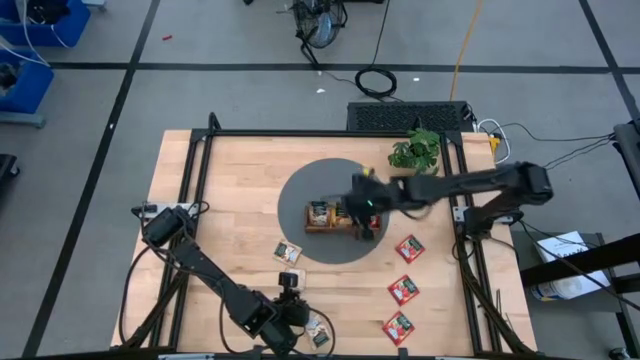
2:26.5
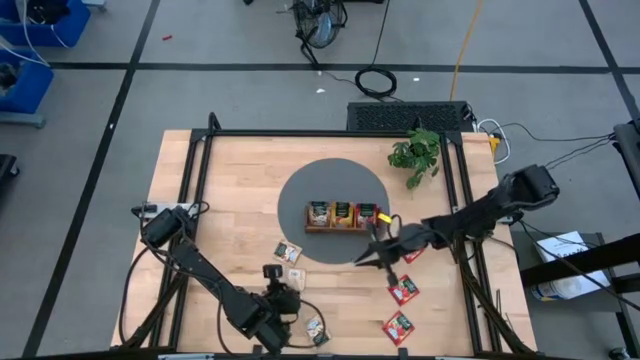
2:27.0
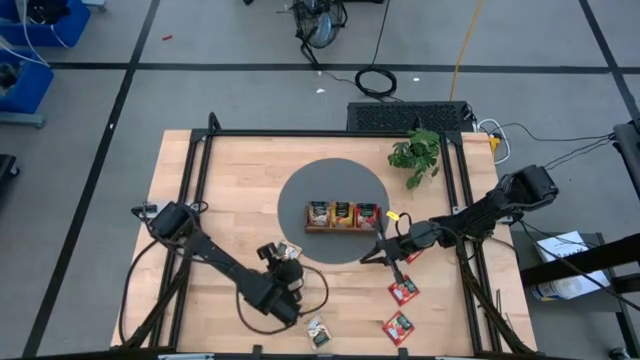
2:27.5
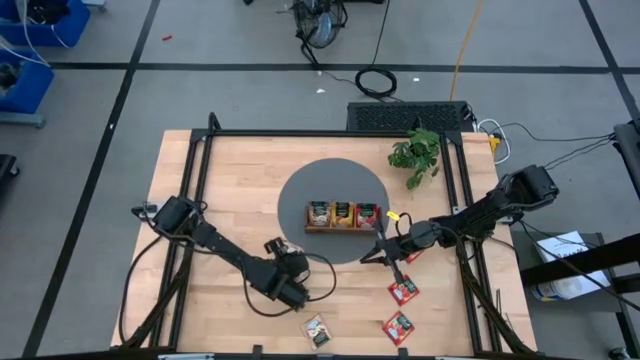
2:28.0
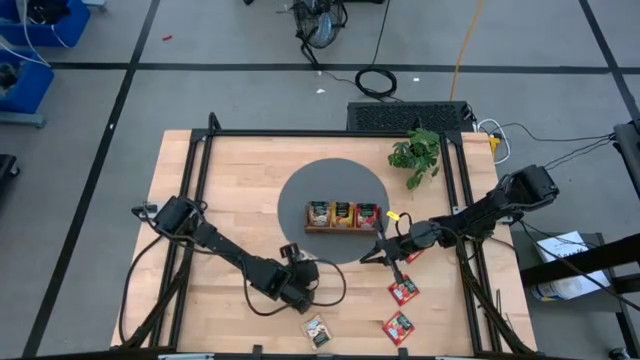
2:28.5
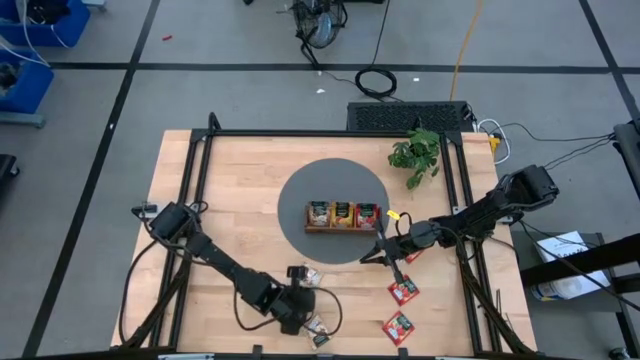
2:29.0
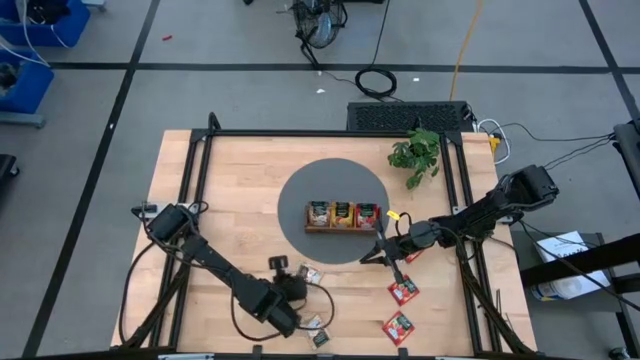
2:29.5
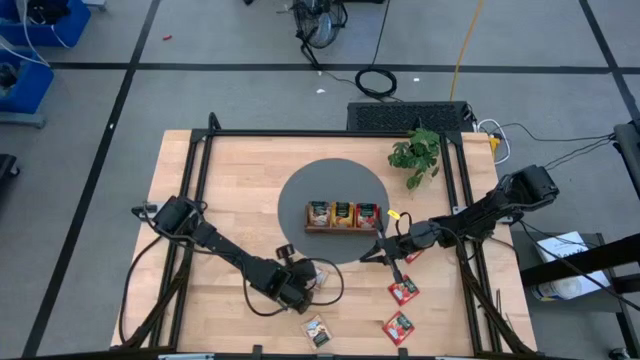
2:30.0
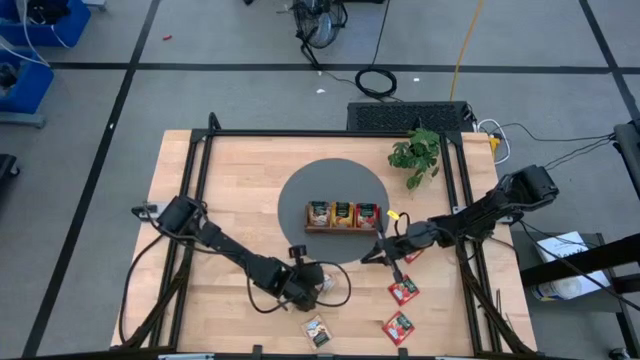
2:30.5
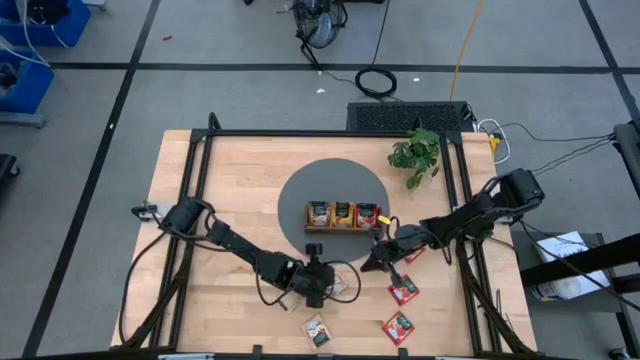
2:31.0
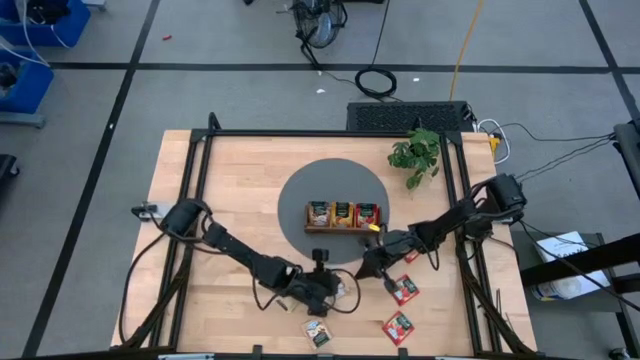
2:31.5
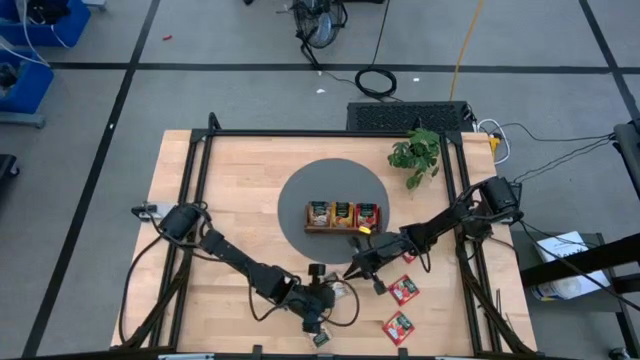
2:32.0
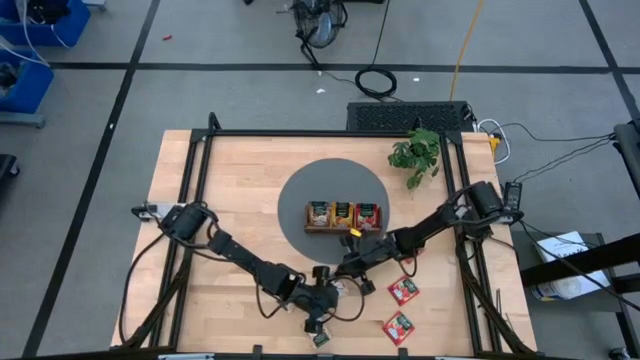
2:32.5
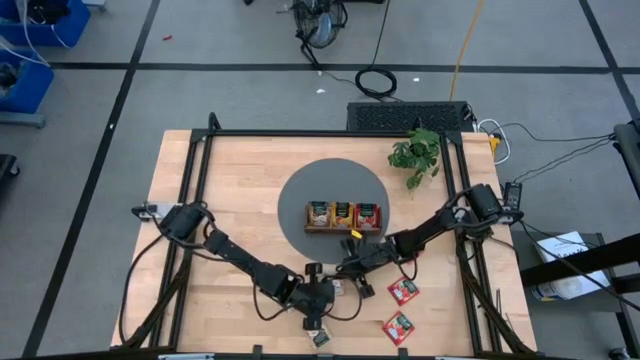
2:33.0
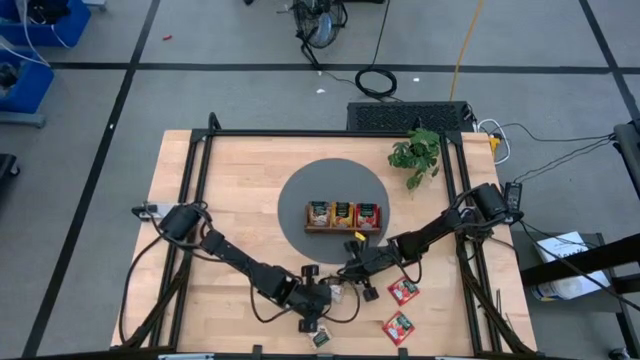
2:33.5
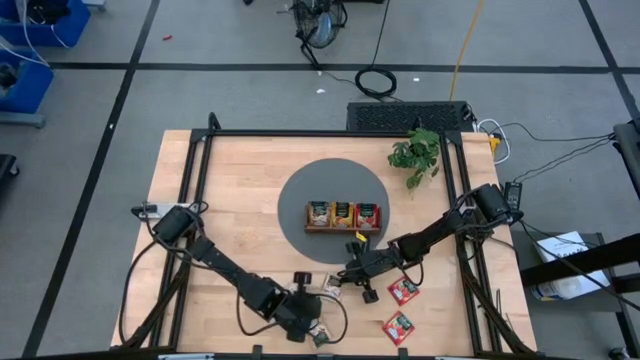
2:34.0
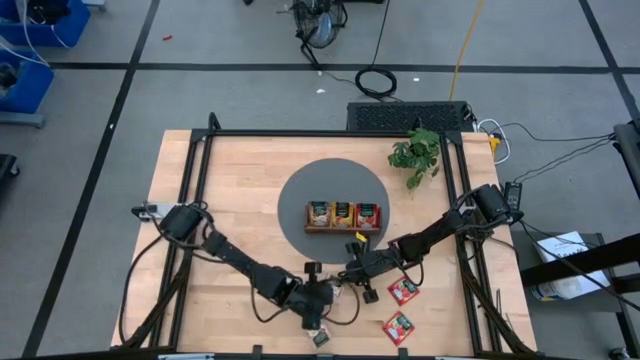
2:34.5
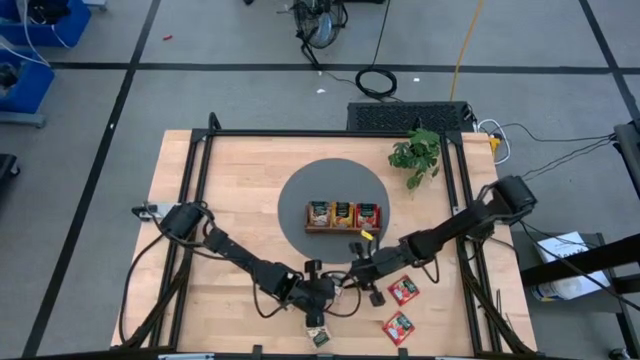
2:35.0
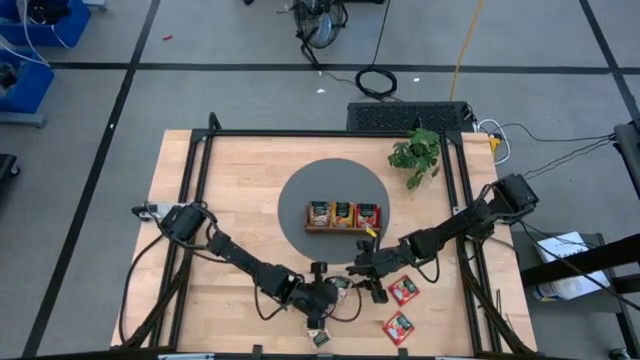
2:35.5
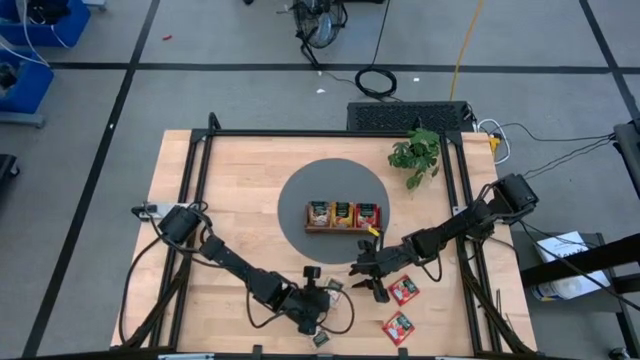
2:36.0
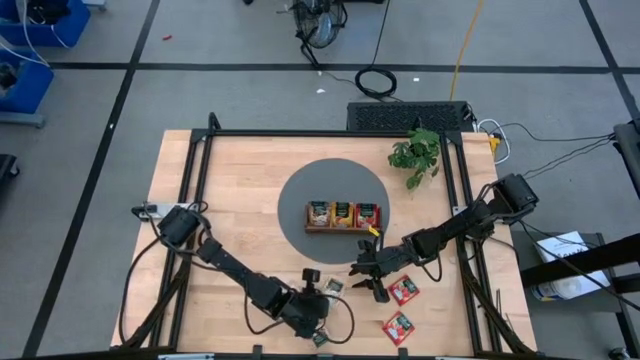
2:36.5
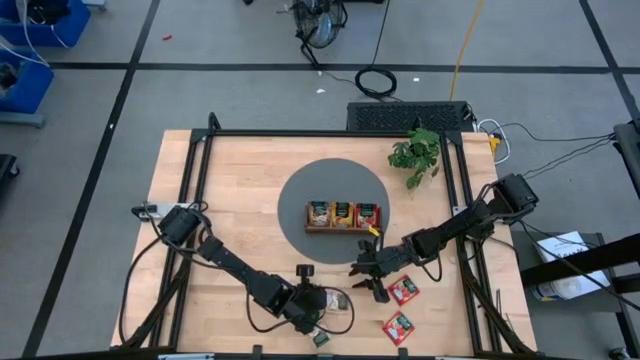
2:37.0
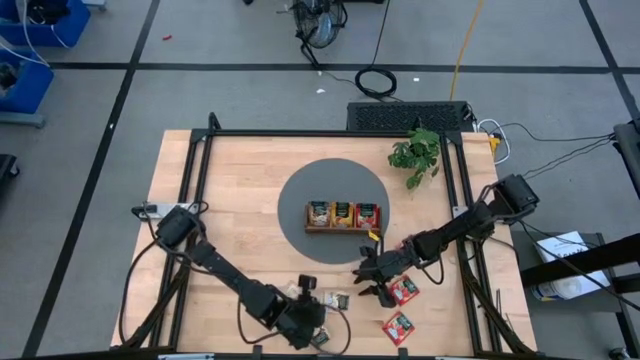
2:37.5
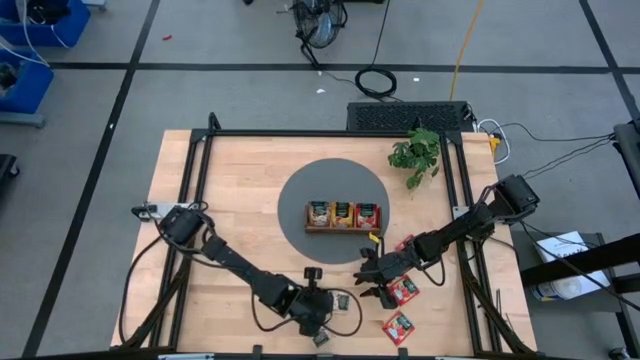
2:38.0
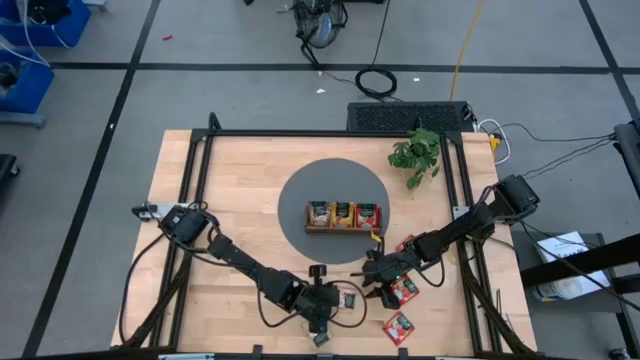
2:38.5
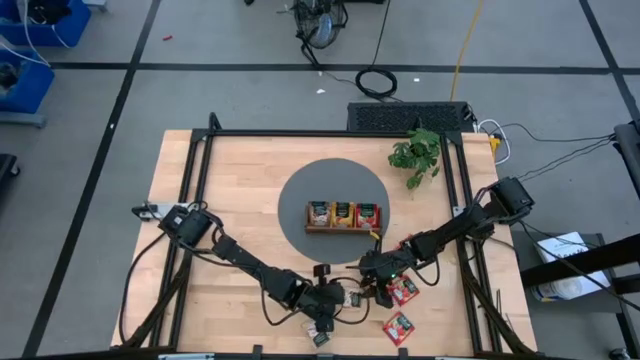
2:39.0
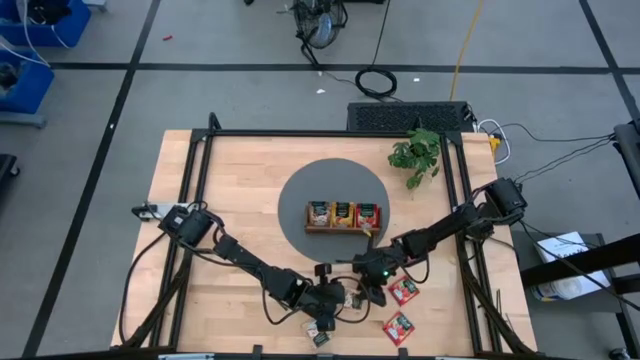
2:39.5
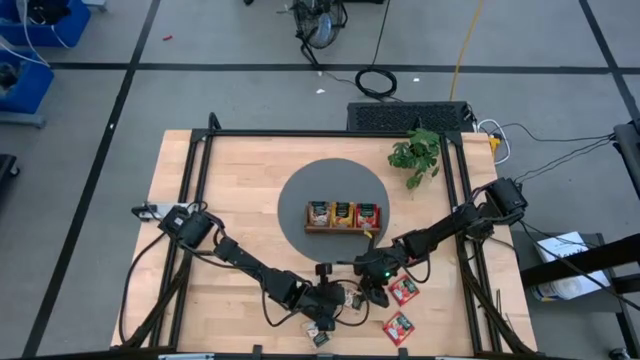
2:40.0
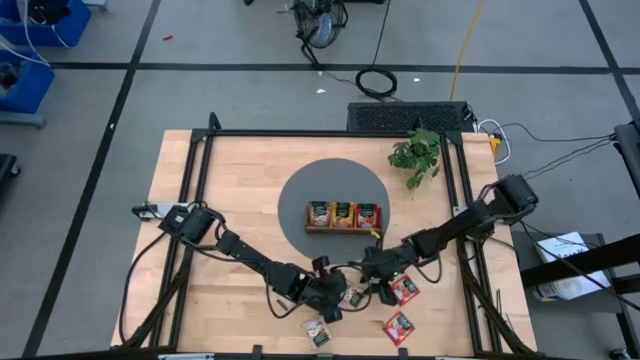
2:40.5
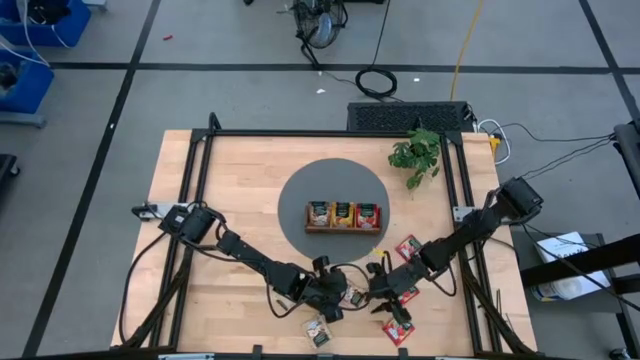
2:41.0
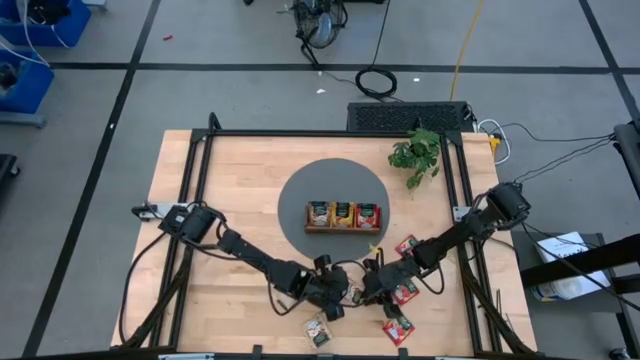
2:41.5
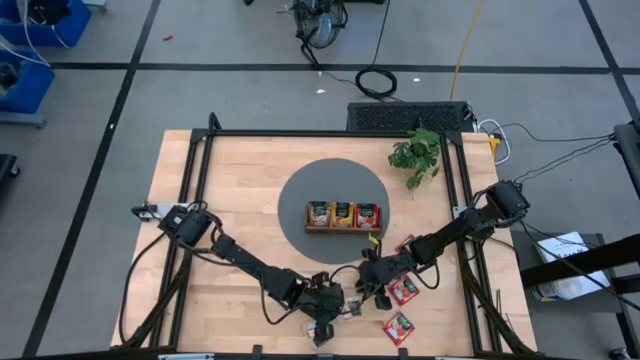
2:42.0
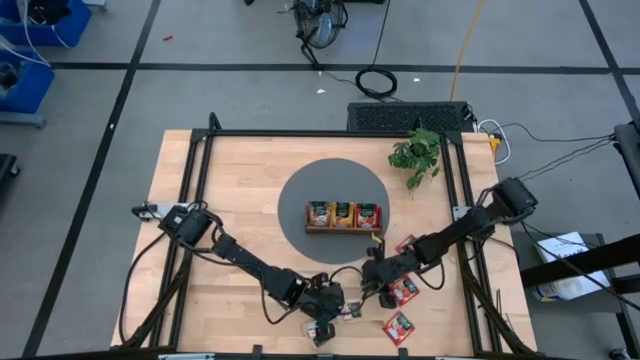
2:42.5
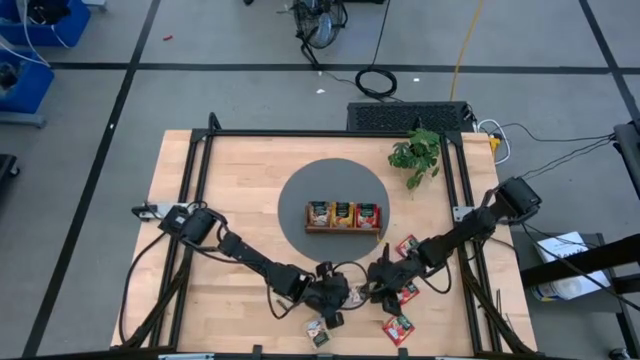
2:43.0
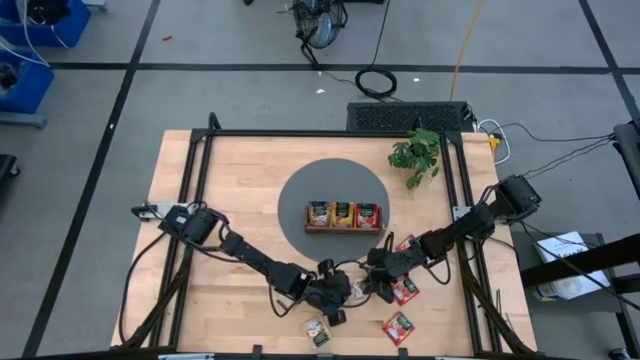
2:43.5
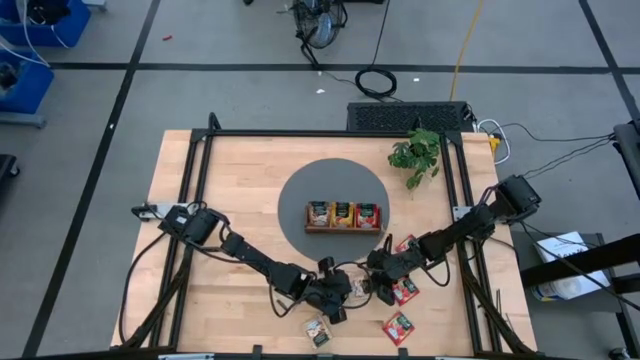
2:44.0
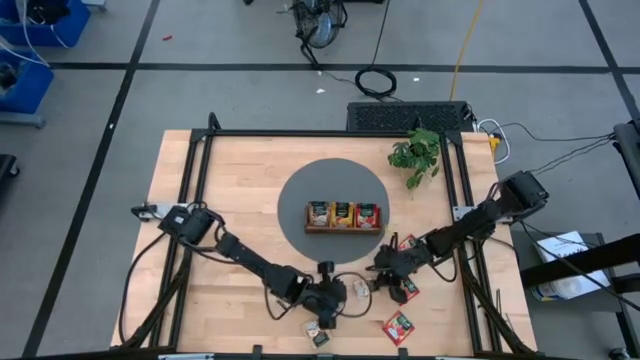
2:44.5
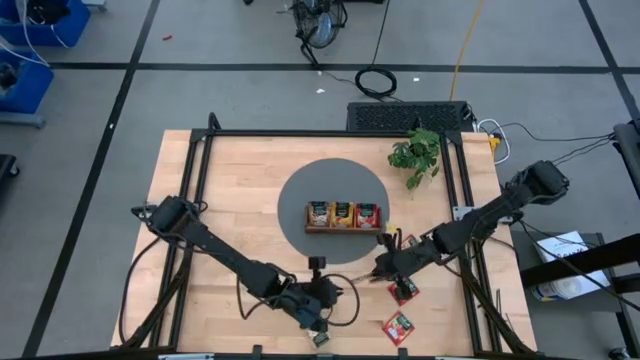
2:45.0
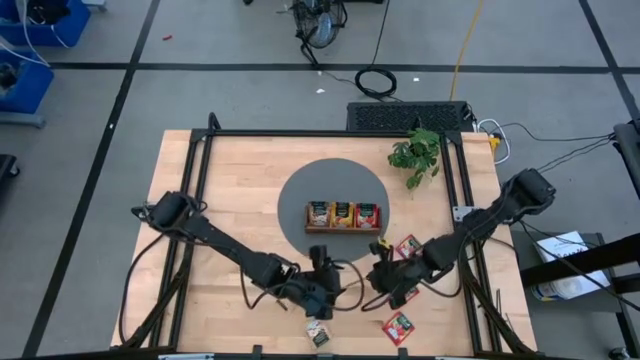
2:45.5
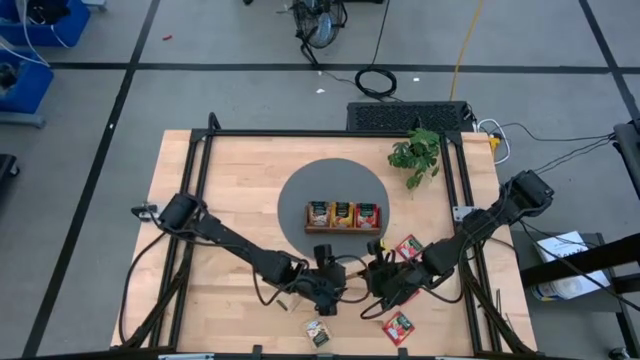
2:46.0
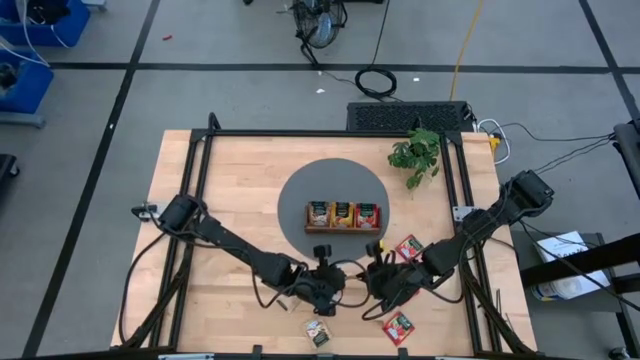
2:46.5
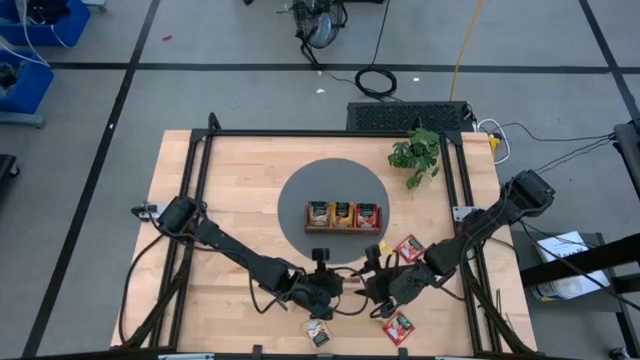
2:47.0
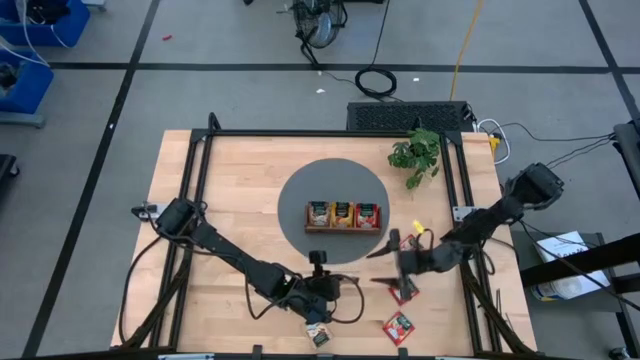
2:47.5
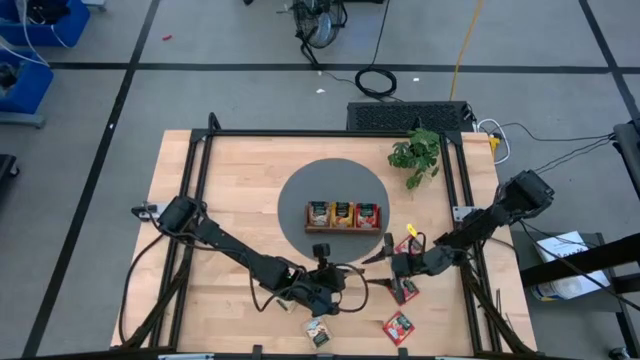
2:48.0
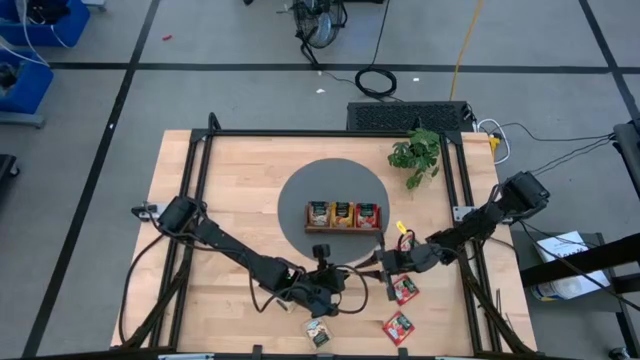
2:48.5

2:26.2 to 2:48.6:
Task: Pick & Place Tea
Put the brown tea bag into the left section of the wooden organizer
